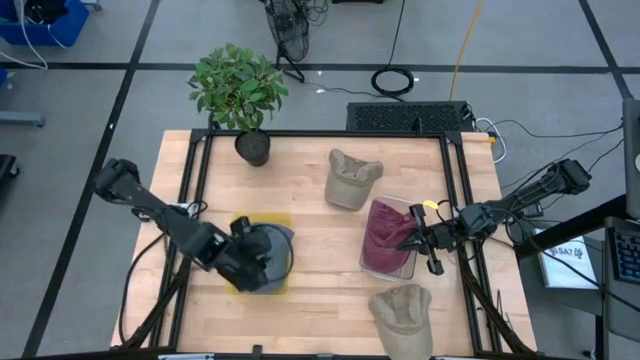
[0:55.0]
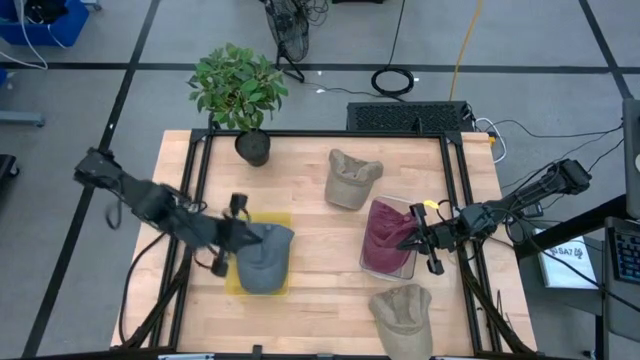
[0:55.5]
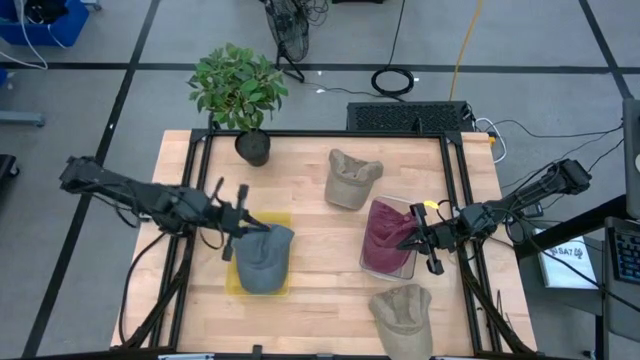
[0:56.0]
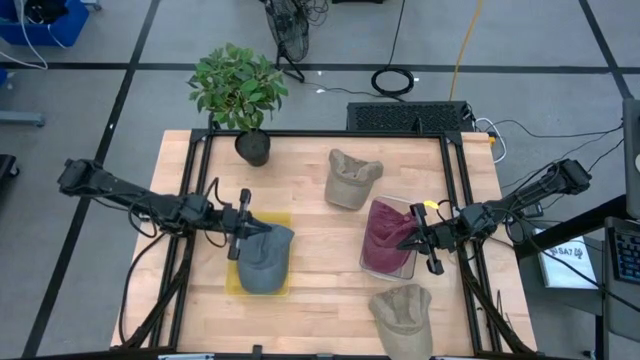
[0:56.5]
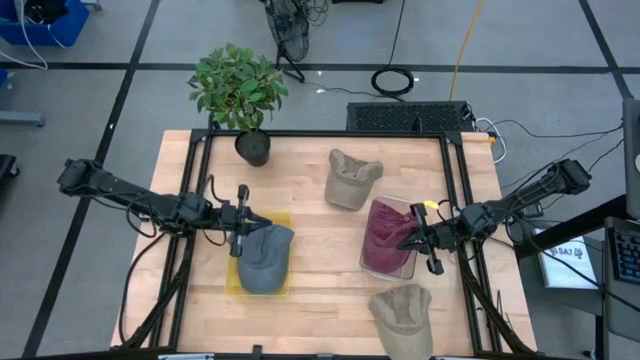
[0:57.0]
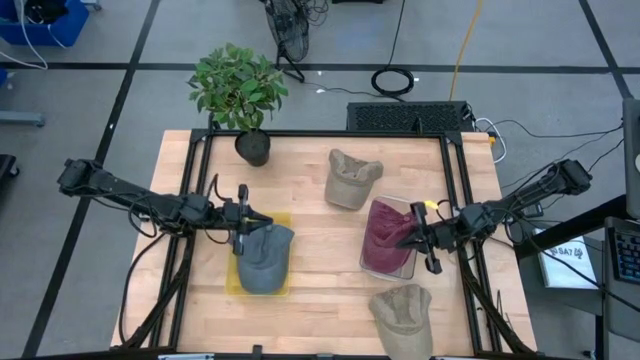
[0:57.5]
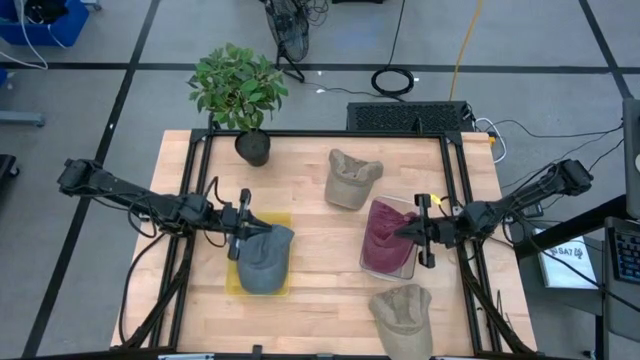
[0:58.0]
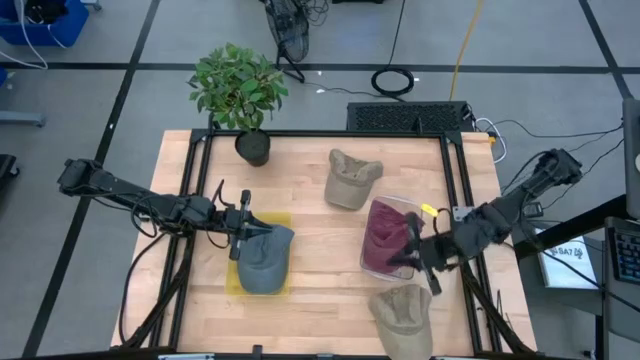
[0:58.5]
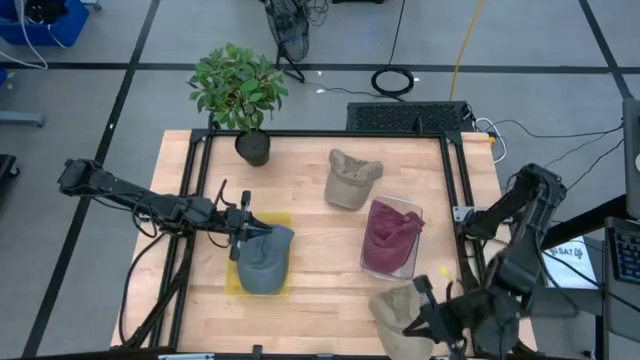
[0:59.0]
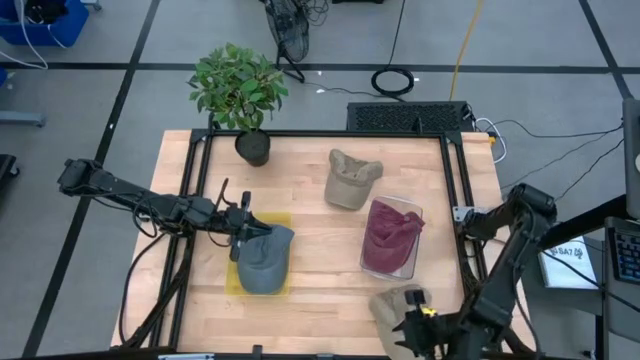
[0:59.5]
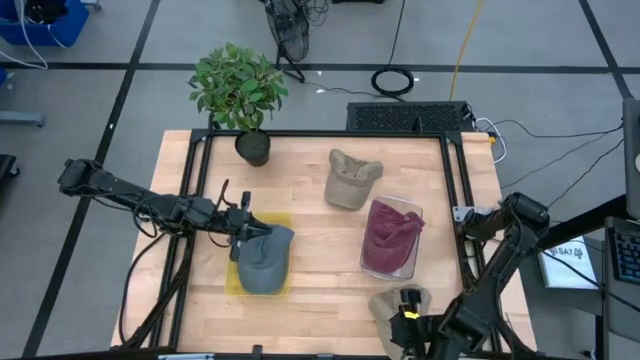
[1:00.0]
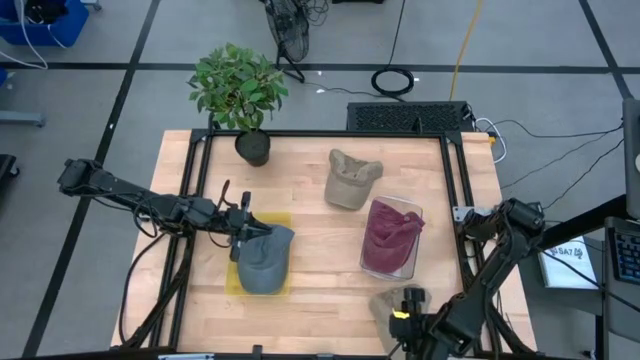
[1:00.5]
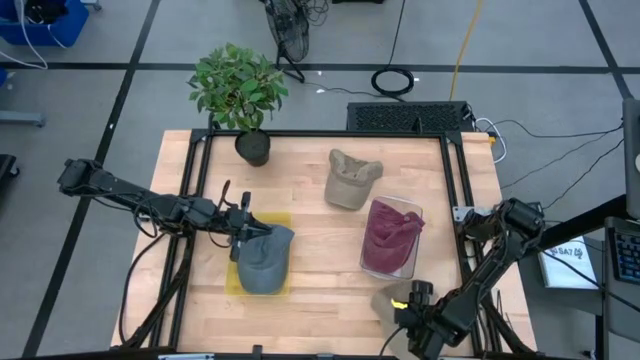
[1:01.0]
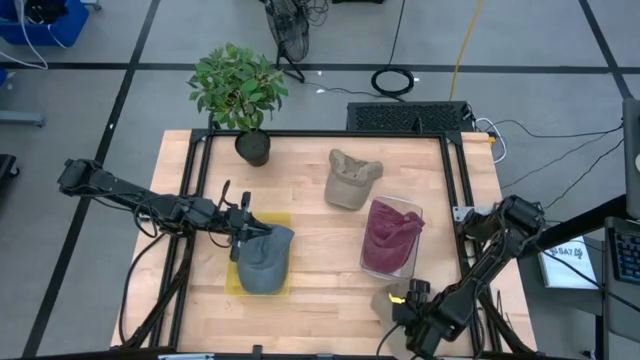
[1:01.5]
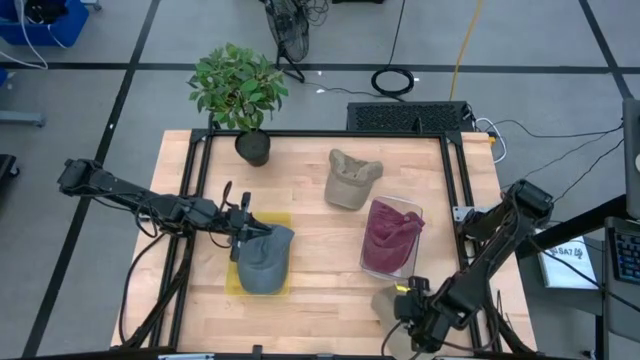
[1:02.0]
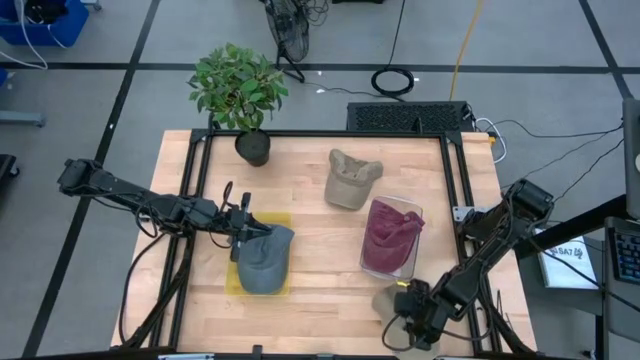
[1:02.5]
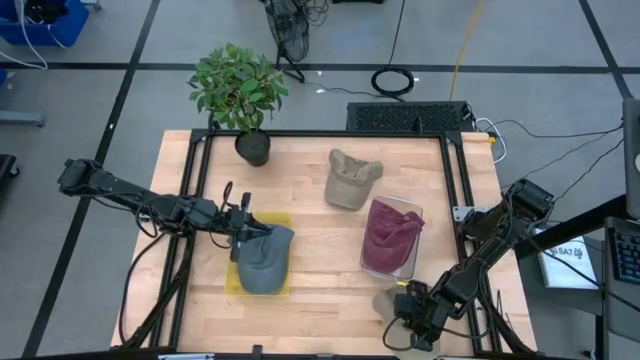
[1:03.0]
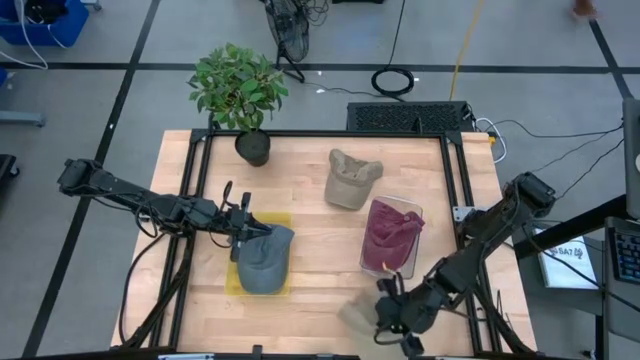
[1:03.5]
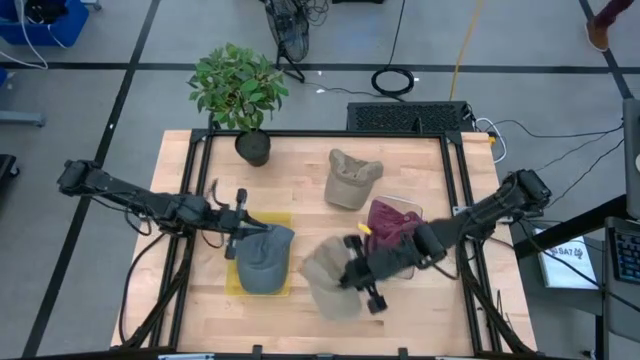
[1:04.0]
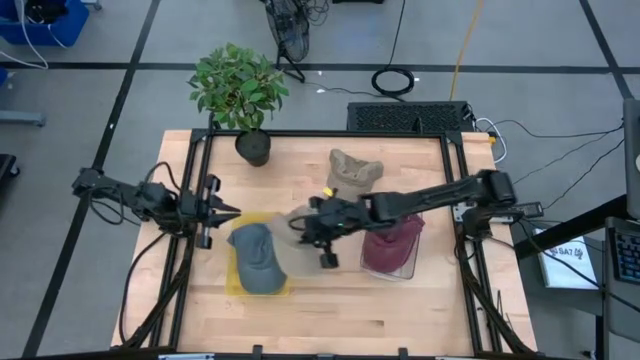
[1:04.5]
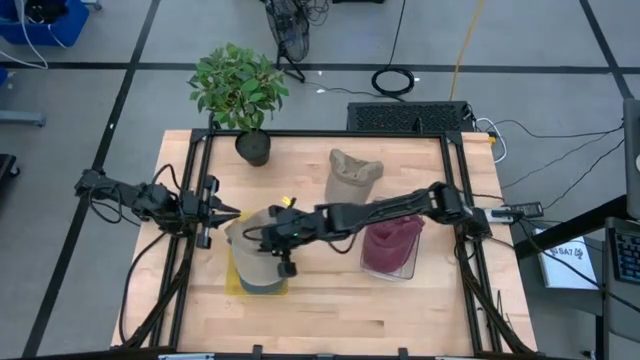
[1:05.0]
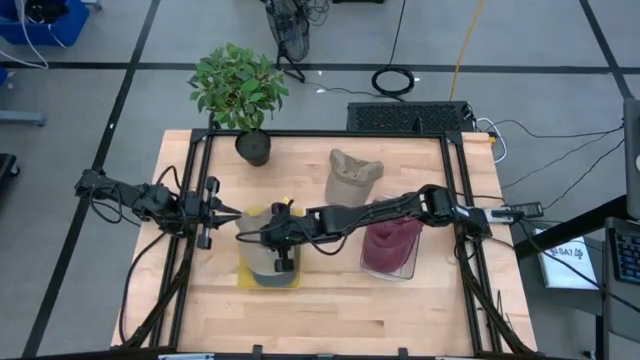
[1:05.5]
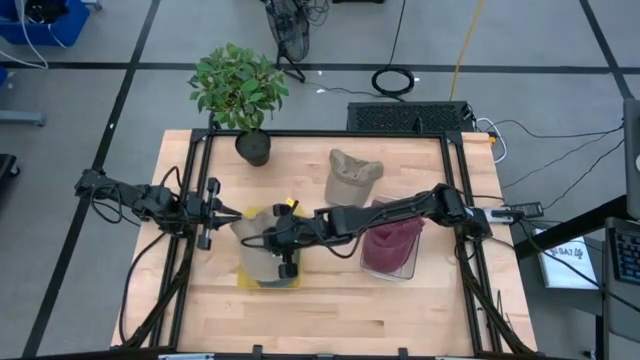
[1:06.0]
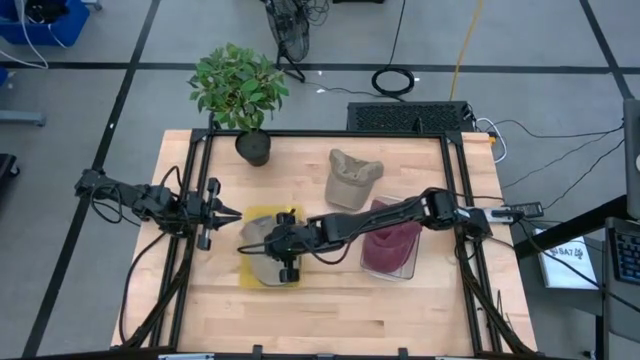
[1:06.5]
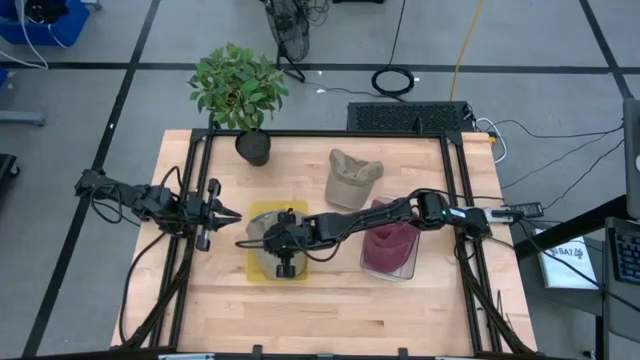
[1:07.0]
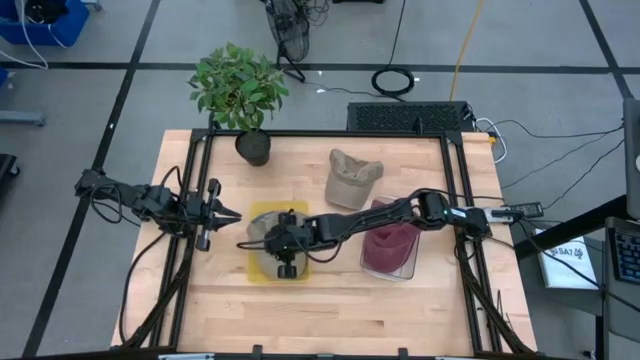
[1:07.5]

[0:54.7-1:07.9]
Task: Pick and place caps into container
Put the bottom brown cap into the yellow container

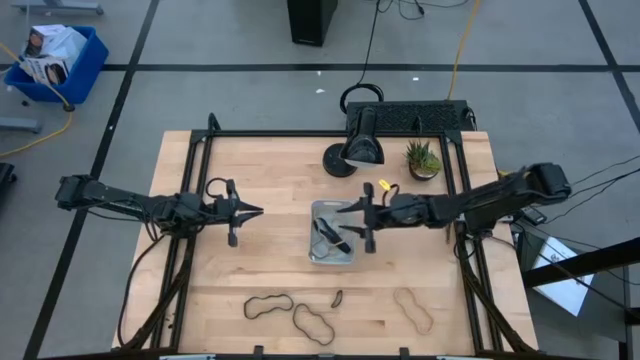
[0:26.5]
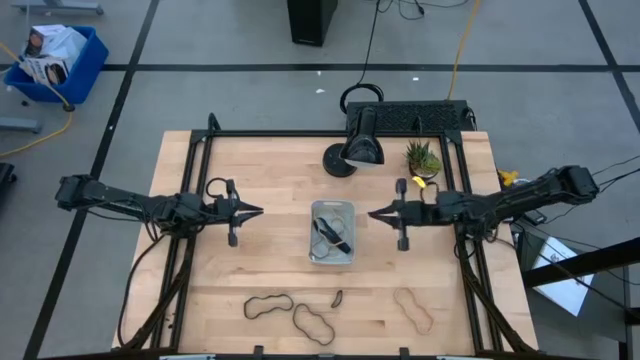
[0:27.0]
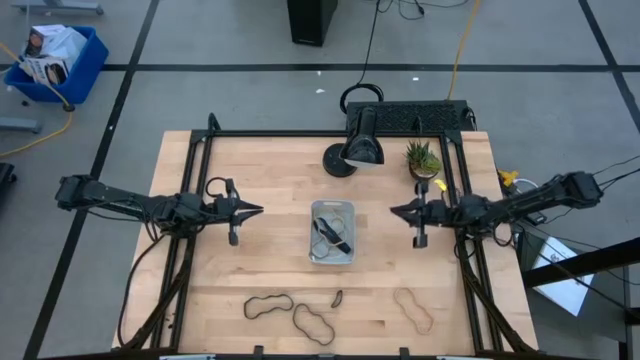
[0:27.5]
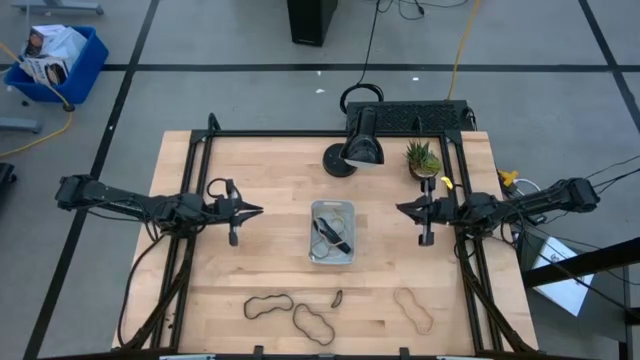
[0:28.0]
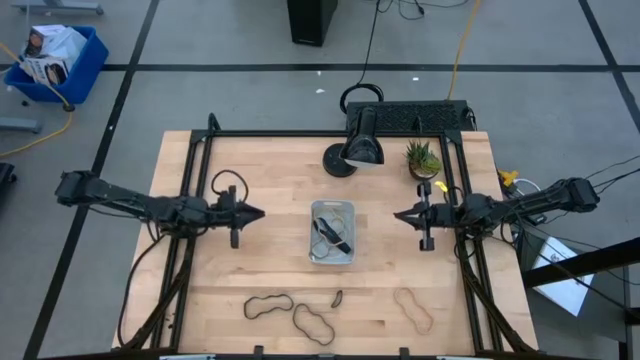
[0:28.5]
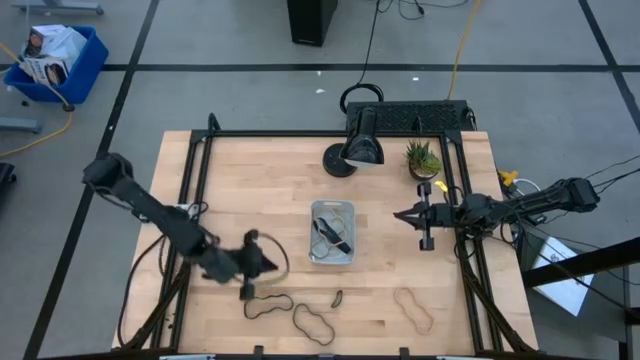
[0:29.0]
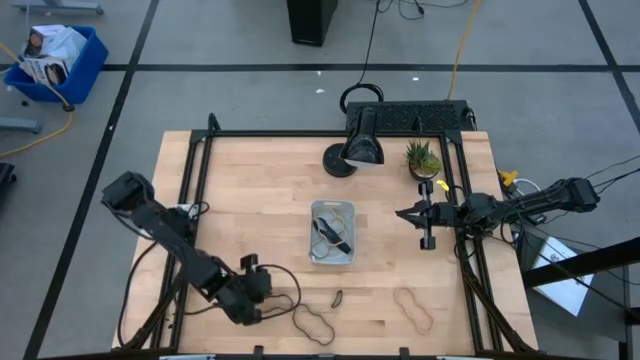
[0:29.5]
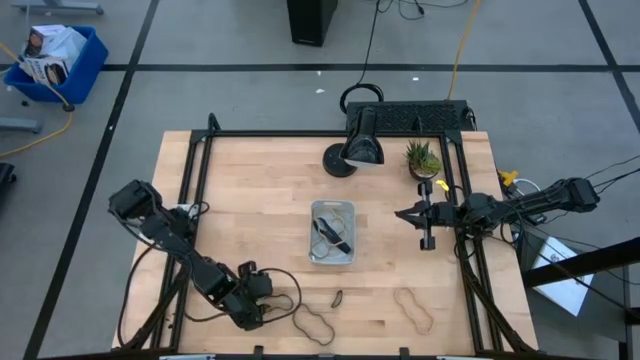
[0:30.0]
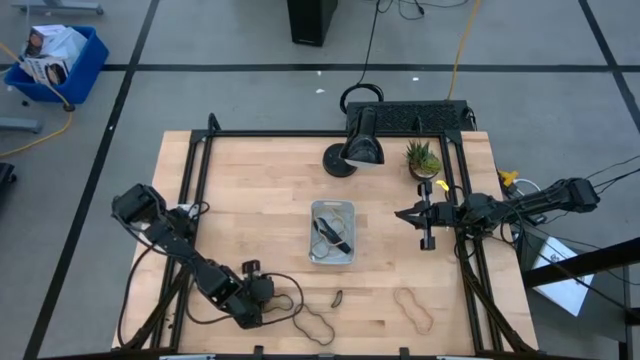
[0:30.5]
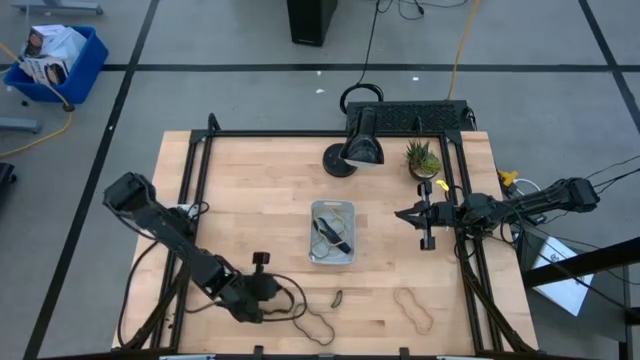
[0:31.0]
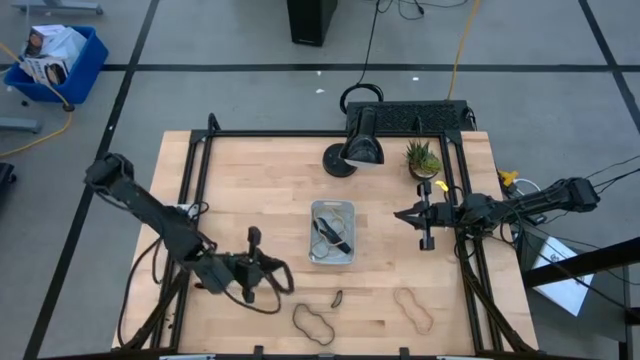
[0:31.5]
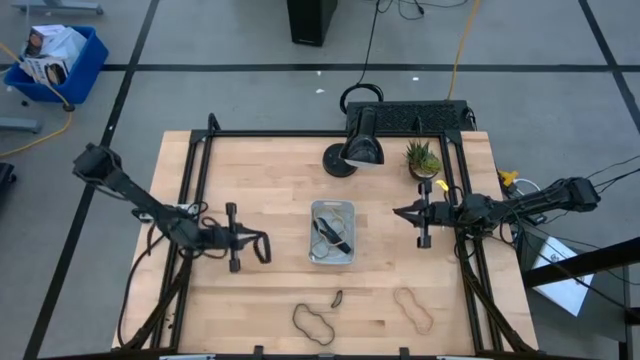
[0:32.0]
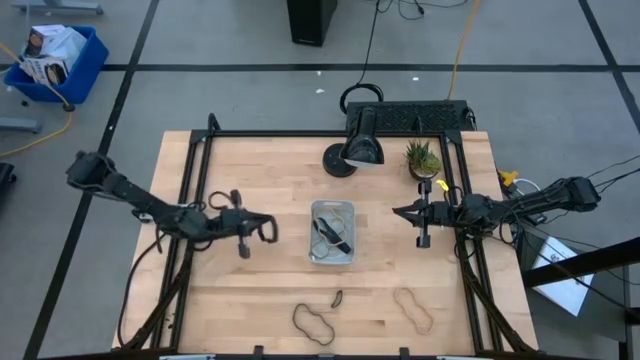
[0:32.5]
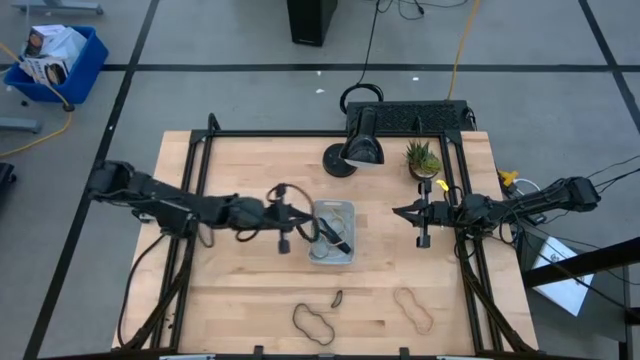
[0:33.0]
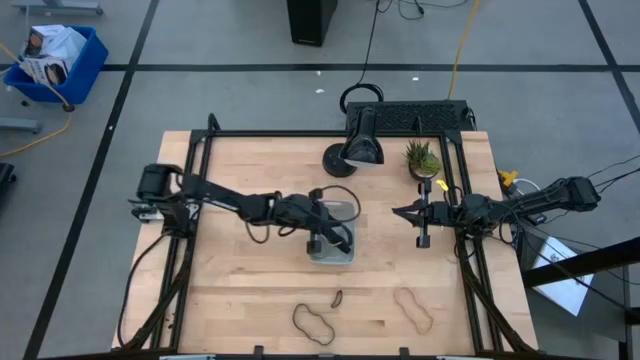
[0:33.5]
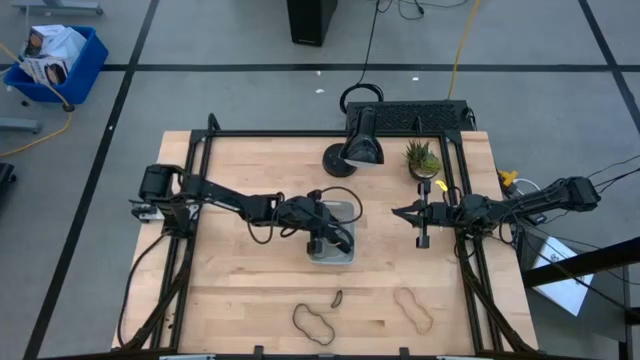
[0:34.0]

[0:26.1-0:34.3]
Task: Pick and place rubber bands into bin
Put the left black rubber band into the gray bin
